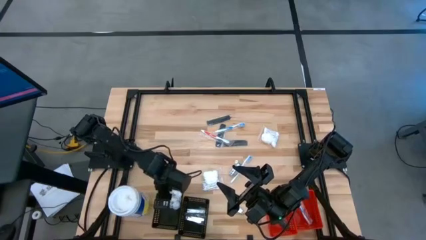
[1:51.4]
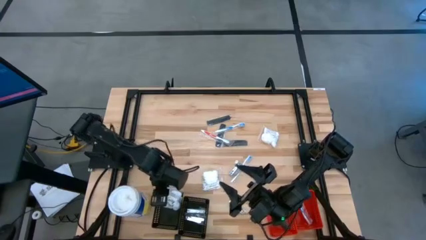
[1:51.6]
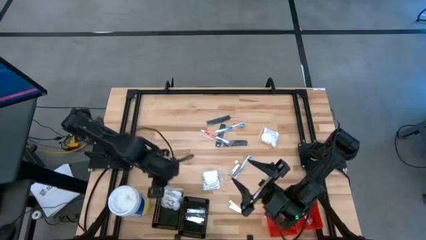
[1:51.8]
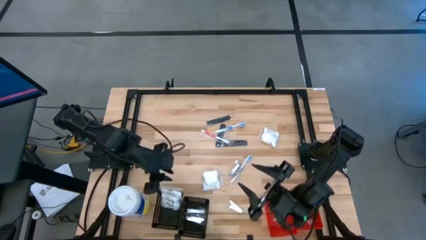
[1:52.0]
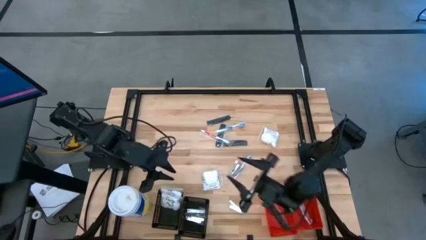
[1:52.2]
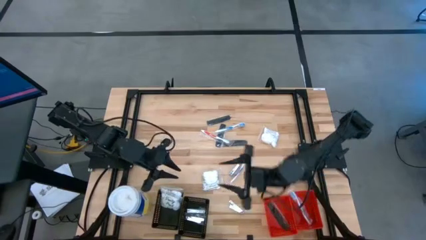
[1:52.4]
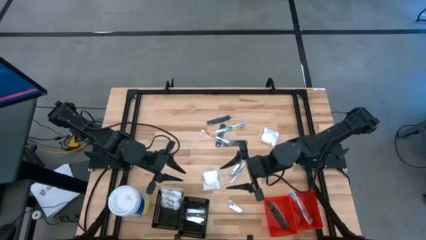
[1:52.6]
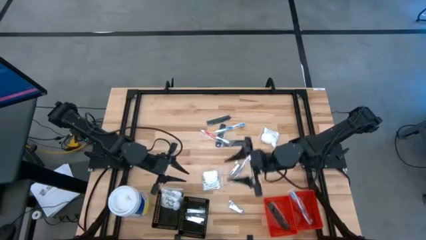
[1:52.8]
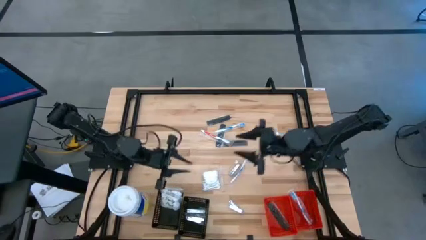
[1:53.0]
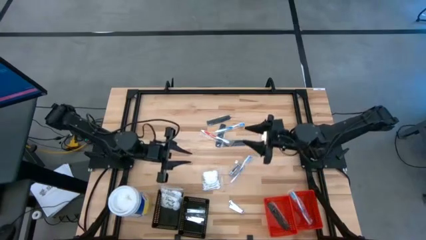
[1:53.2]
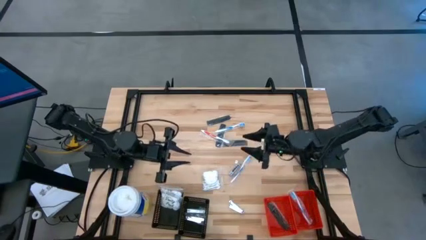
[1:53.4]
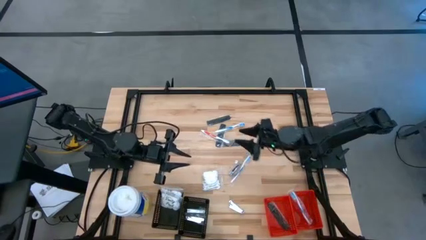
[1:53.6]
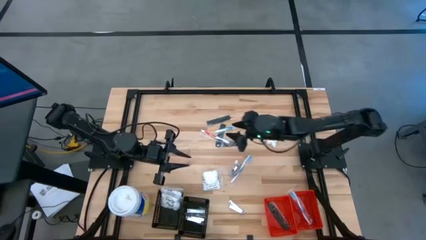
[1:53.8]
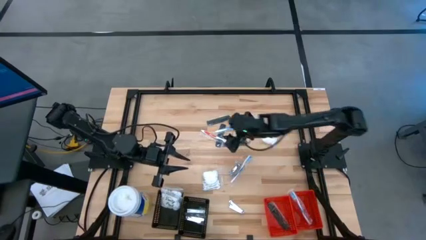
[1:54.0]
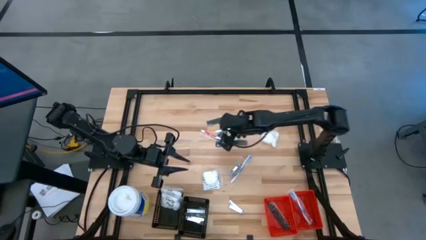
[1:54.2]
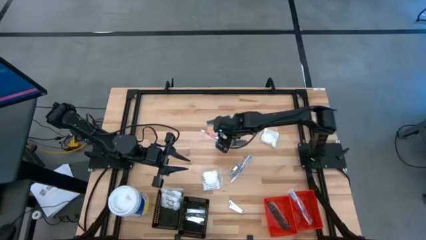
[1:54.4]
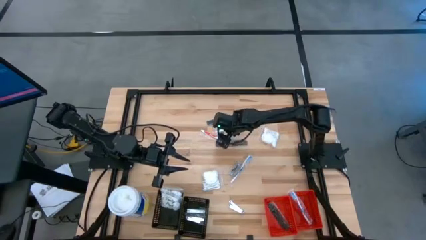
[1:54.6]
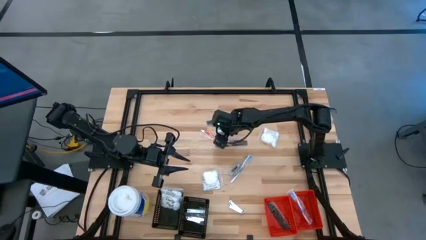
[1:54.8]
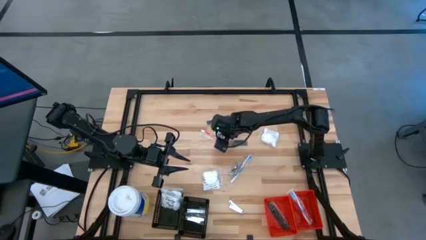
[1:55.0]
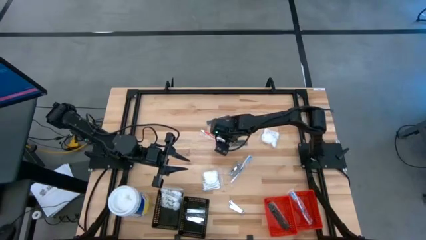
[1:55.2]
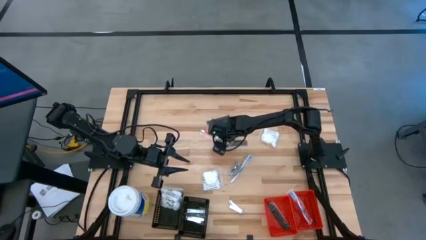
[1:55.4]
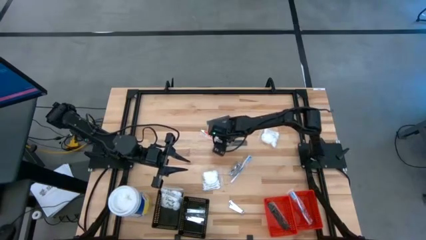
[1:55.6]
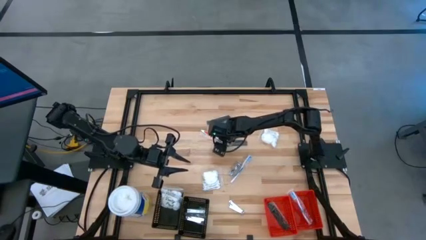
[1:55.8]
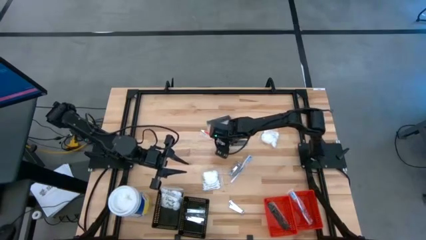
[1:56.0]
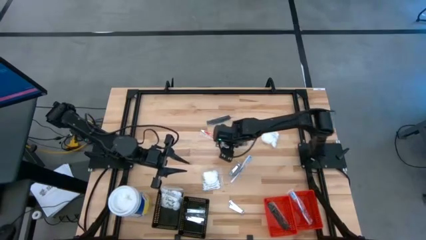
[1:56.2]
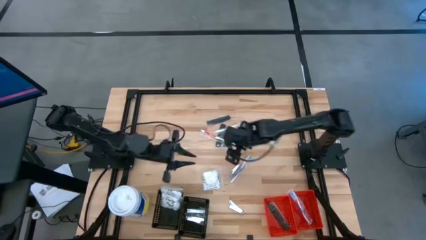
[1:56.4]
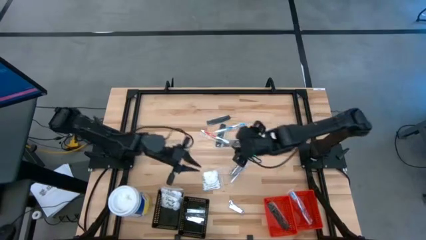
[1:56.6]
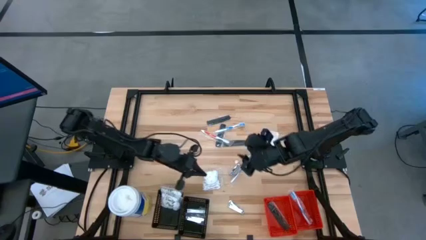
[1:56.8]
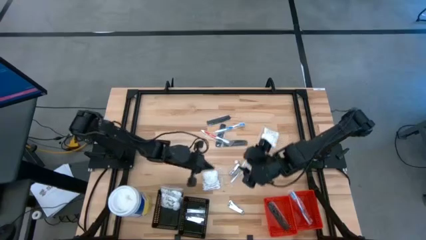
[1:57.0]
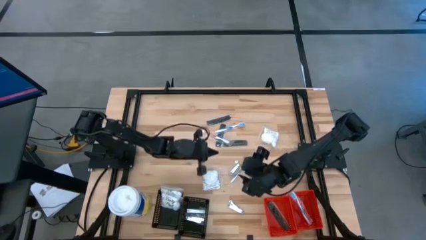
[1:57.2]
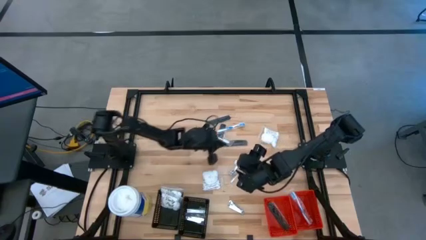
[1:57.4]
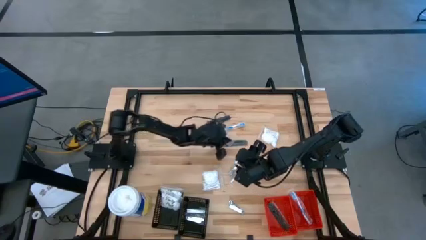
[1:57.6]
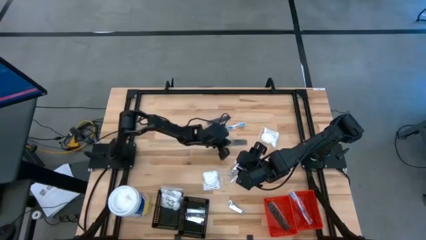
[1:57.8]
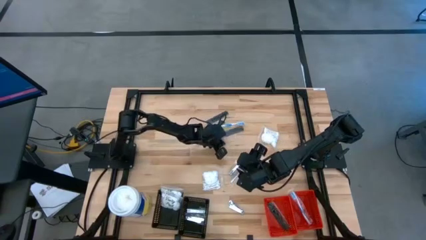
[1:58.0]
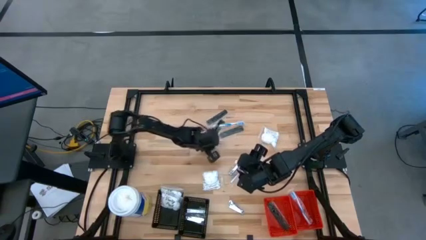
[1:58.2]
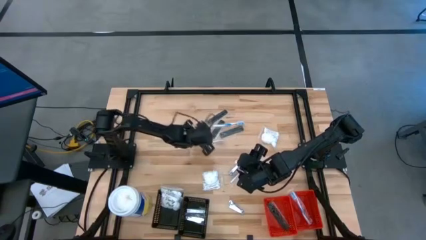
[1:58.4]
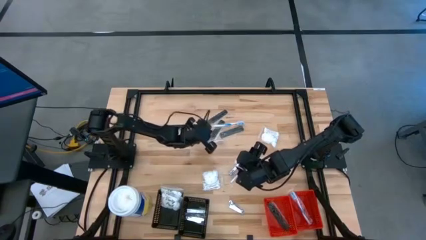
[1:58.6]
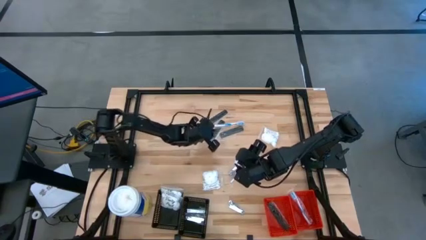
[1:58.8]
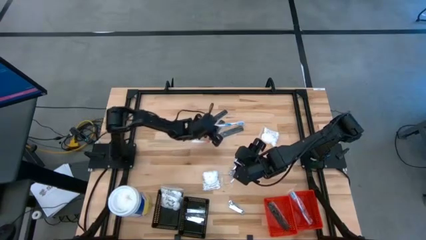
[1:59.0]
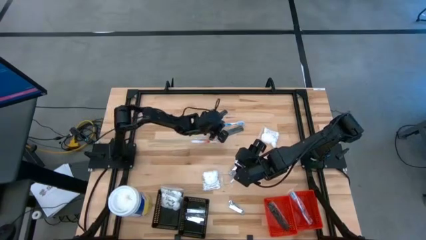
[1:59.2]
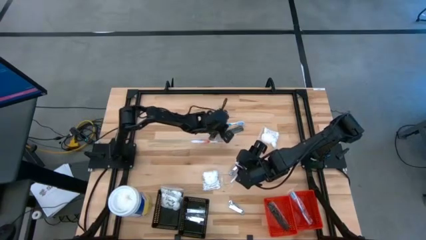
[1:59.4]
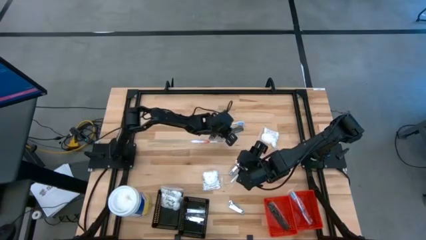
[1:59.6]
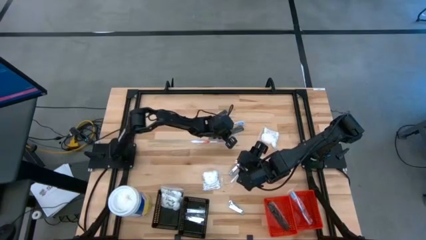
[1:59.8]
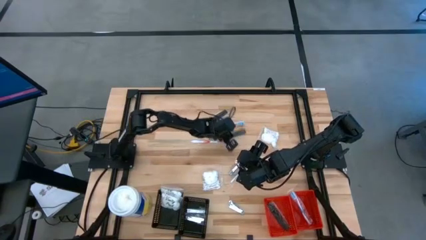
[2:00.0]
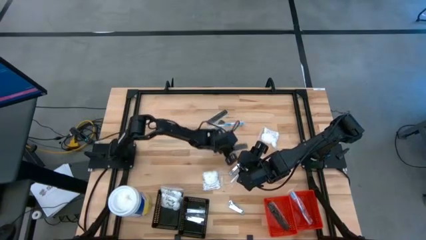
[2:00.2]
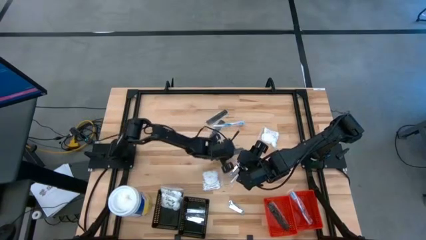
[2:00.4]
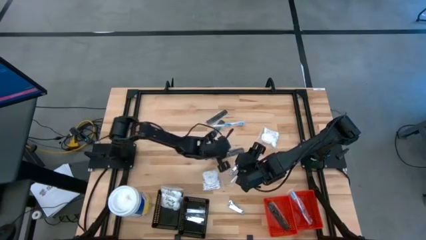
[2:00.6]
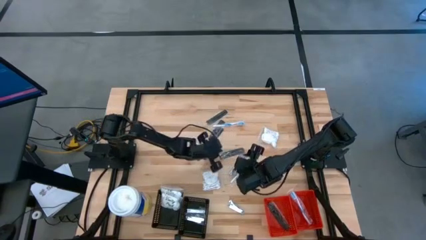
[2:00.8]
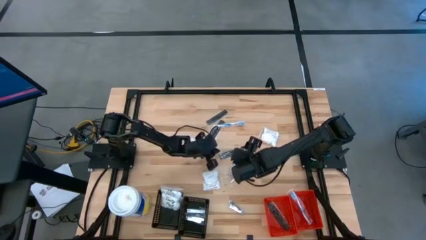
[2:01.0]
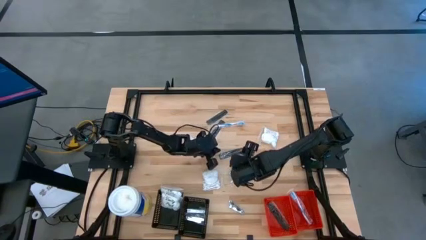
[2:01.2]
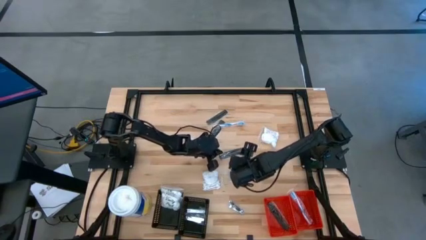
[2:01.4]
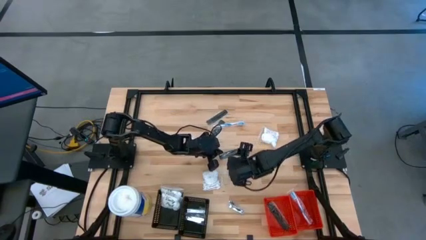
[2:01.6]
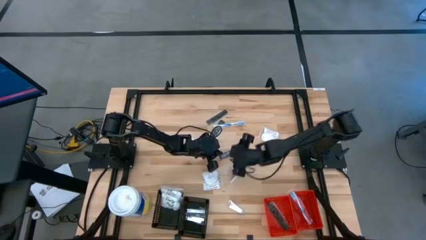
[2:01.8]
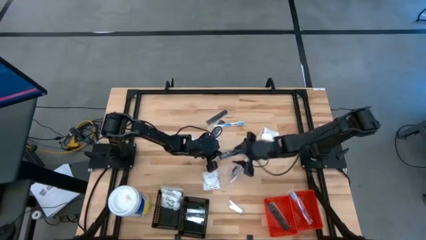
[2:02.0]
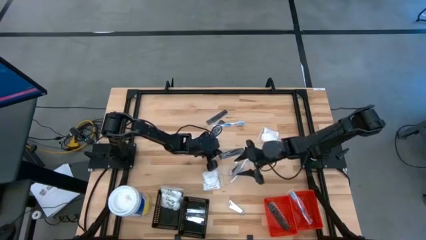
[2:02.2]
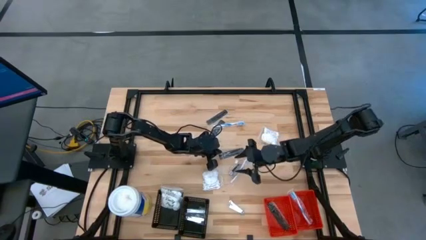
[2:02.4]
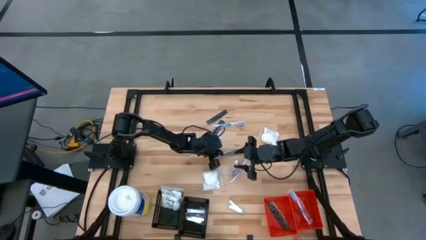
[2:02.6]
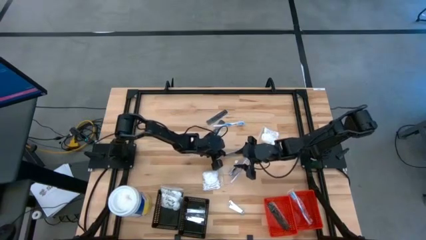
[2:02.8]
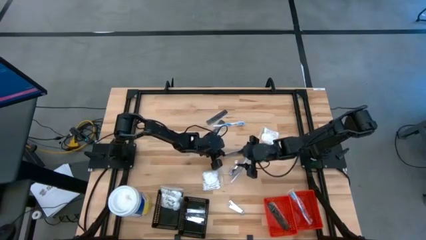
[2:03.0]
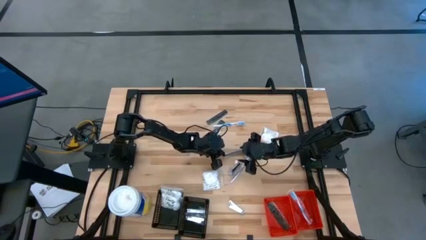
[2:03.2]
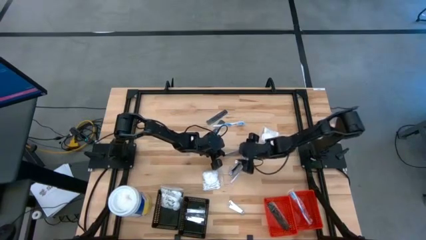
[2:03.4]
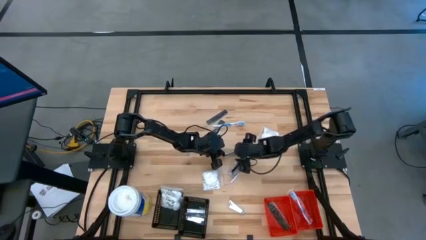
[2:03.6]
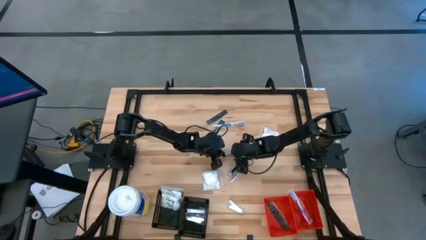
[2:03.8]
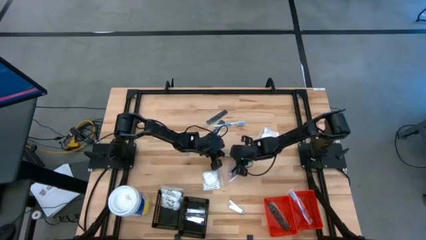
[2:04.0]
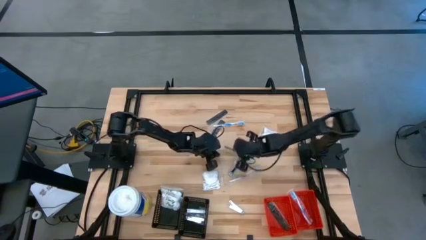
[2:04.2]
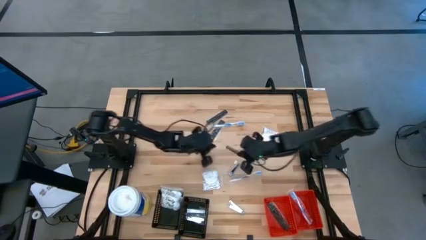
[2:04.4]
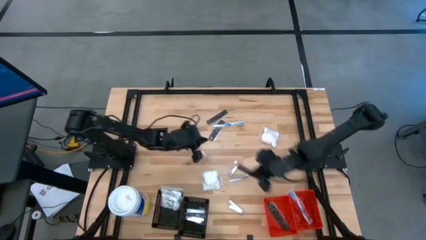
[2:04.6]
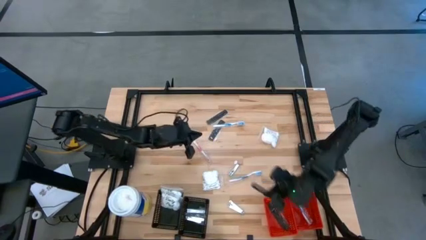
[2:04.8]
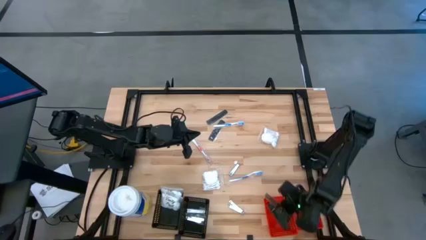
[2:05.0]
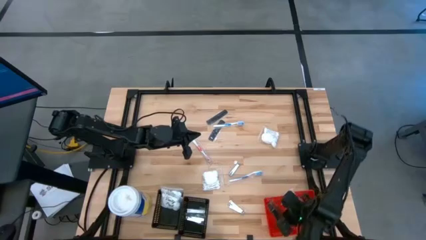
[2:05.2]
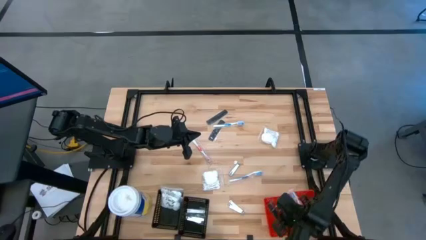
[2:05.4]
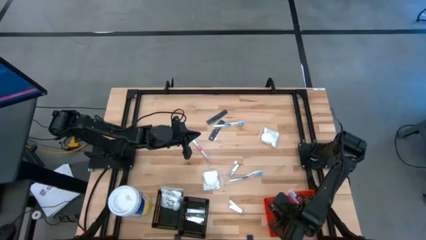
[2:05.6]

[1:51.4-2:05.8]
Task: Pick & Place Travel size toiletries
Put the black hair comb into the left red bin

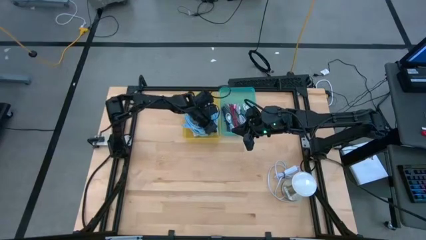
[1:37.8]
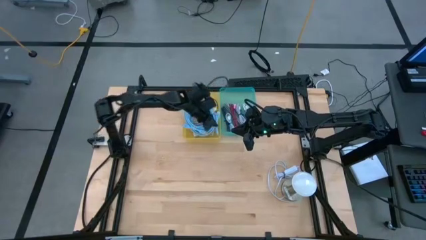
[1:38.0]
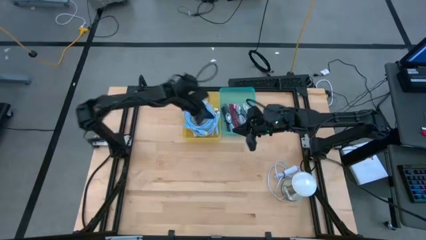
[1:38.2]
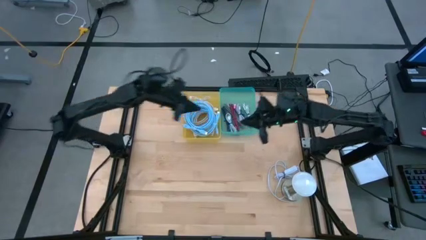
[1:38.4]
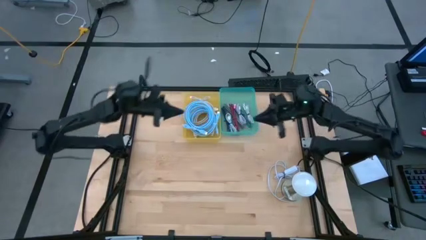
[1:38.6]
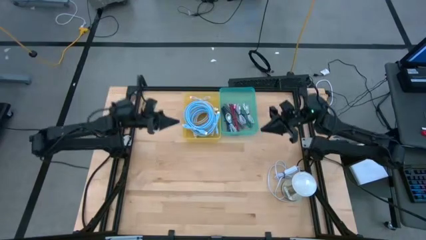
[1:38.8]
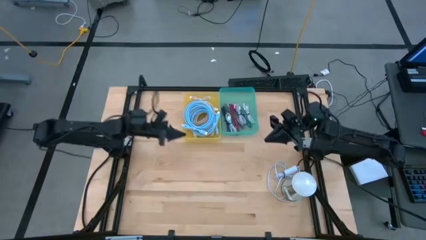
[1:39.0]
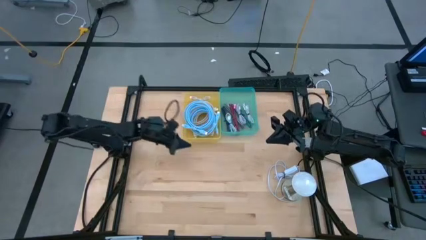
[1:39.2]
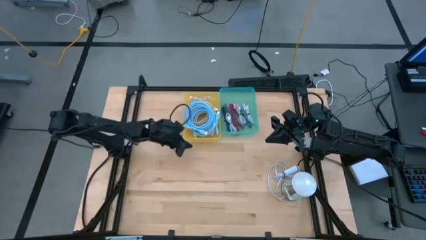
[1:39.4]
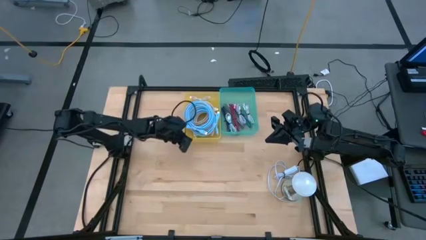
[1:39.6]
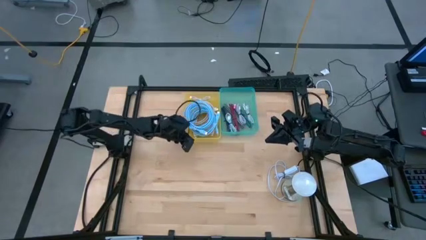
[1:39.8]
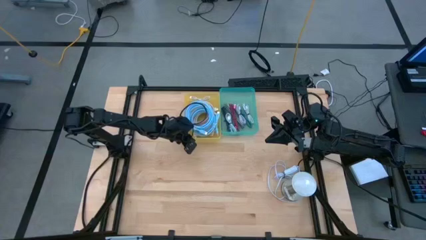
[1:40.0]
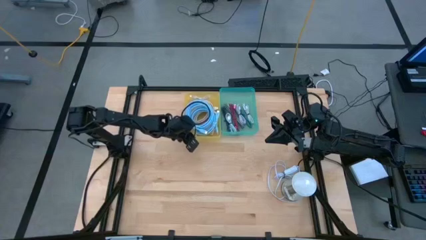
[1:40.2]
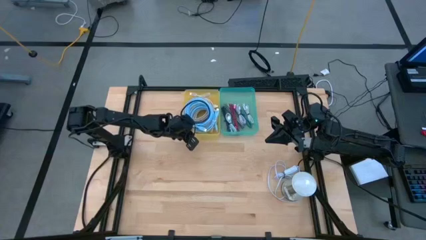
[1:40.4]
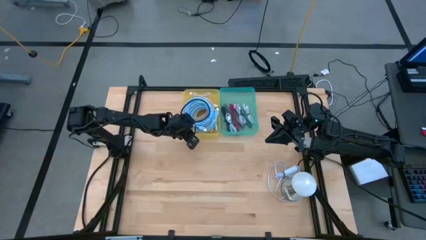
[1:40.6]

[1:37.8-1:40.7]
Task: Pick and place USB-C Cables
Adjust the yellow bin
